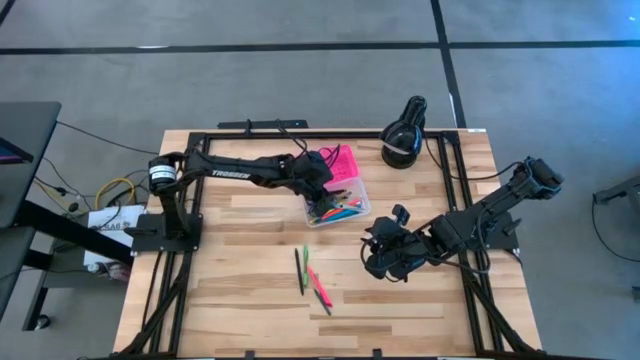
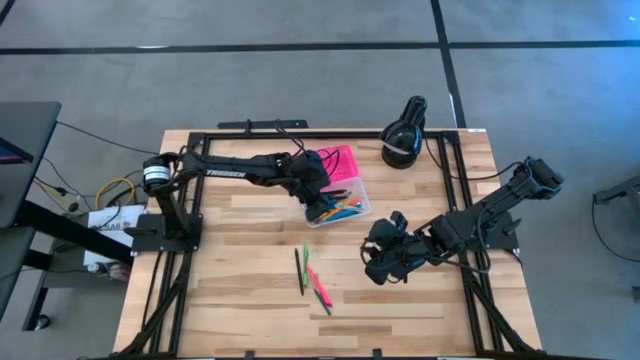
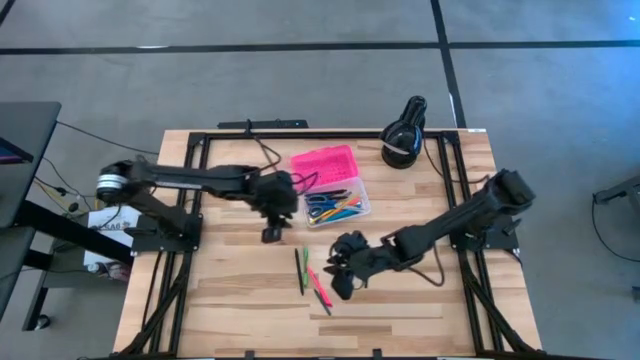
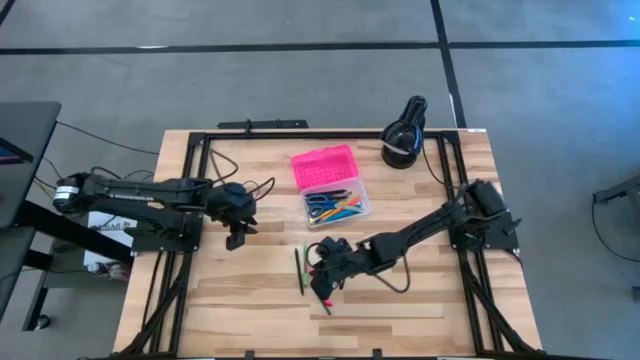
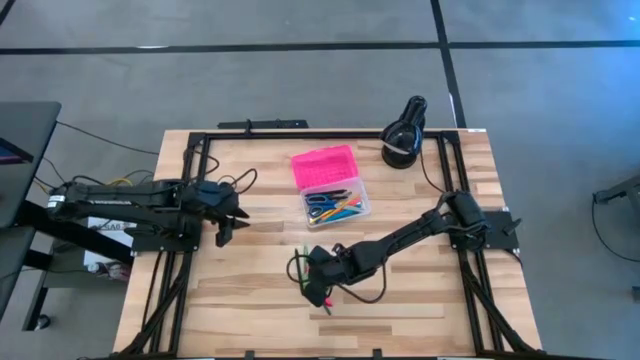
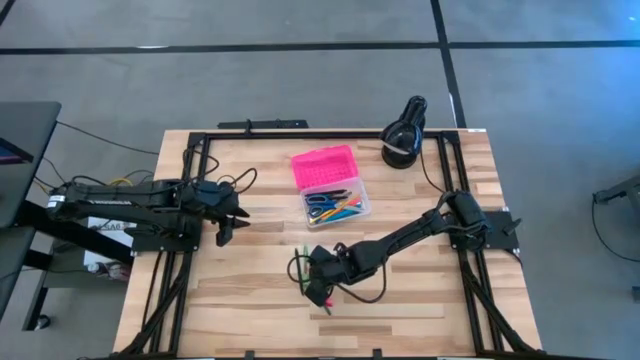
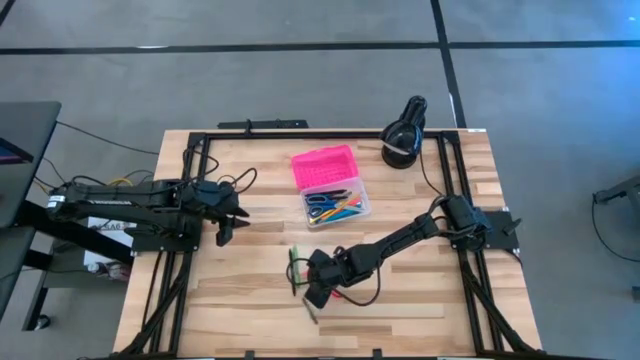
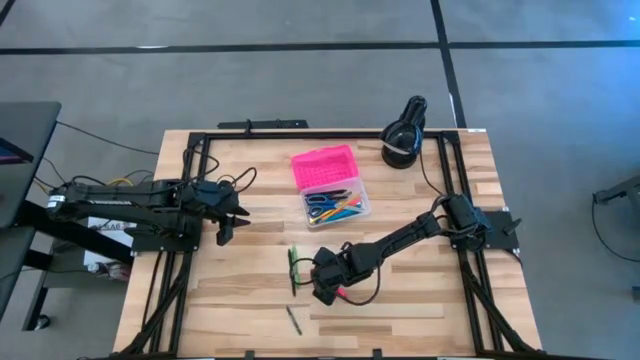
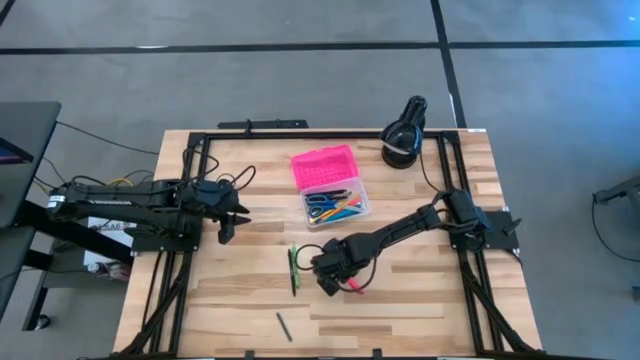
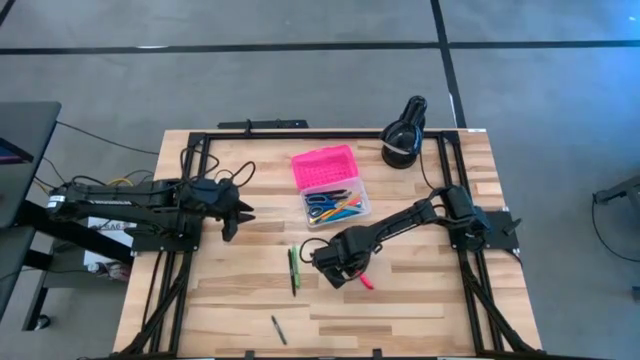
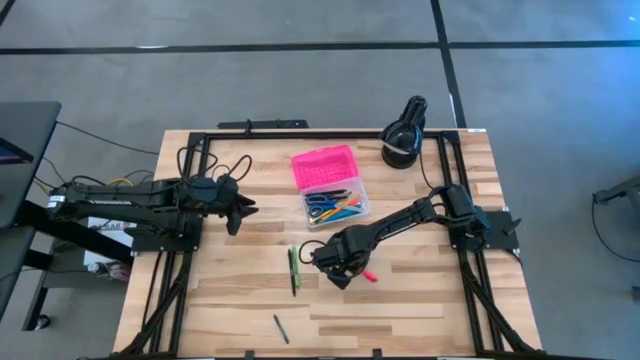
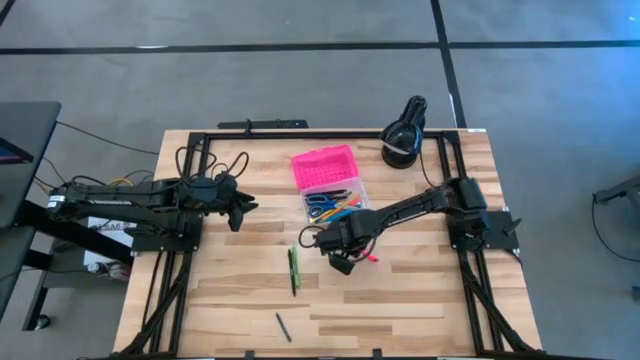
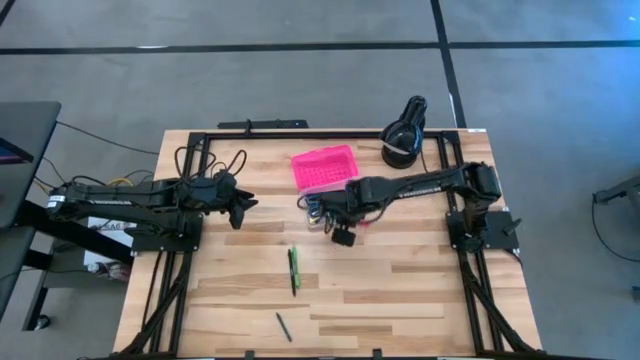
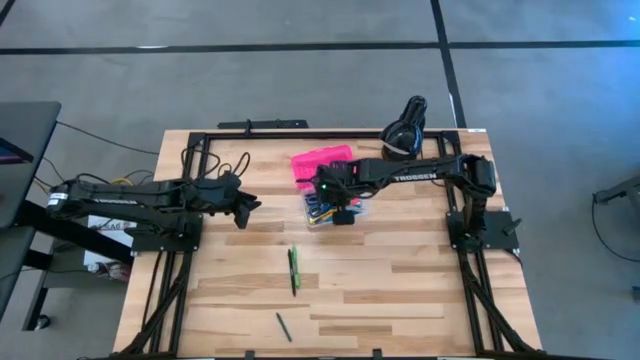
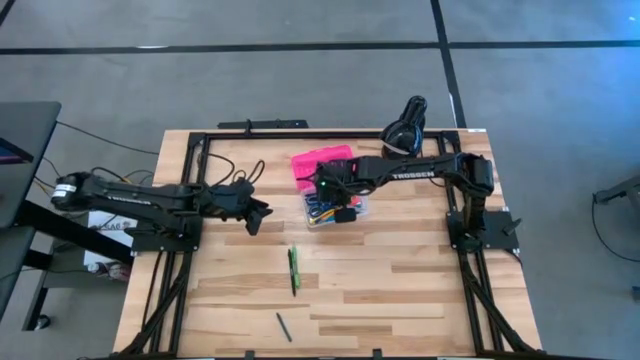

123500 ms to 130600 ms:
Task: Pick & place school supplies into a supply box
Put the pink pen into the pink supply box

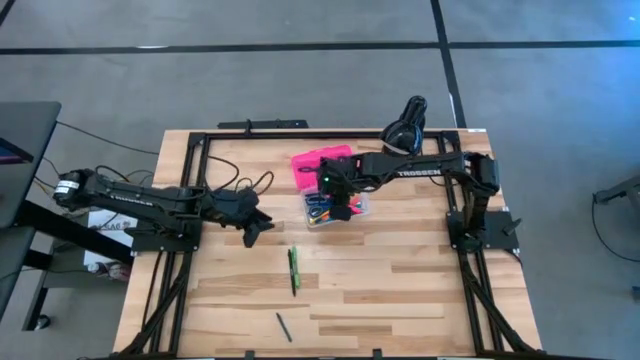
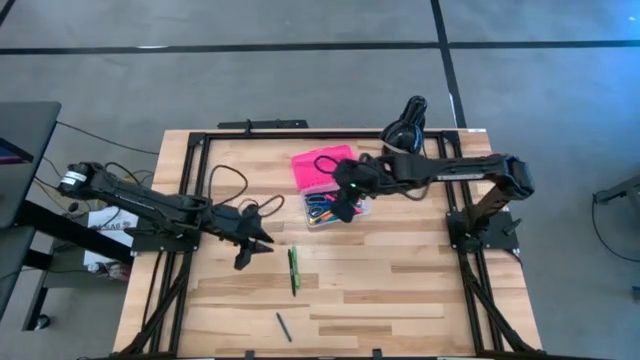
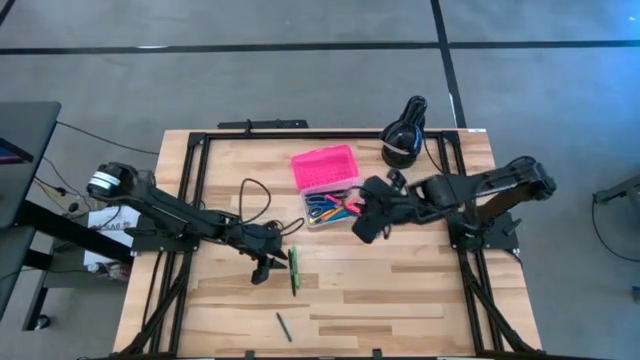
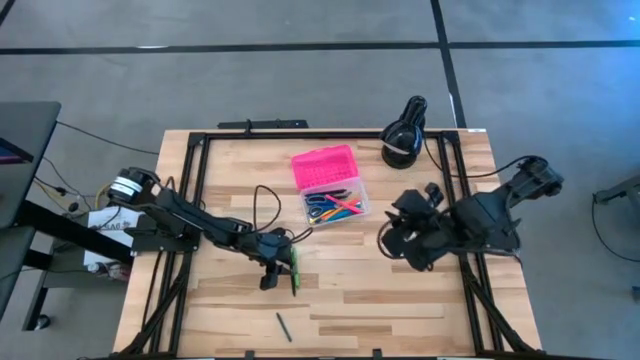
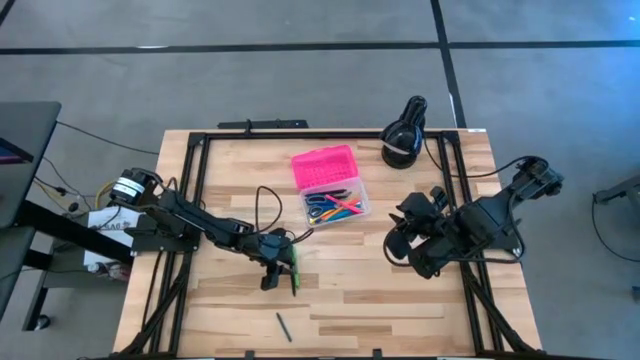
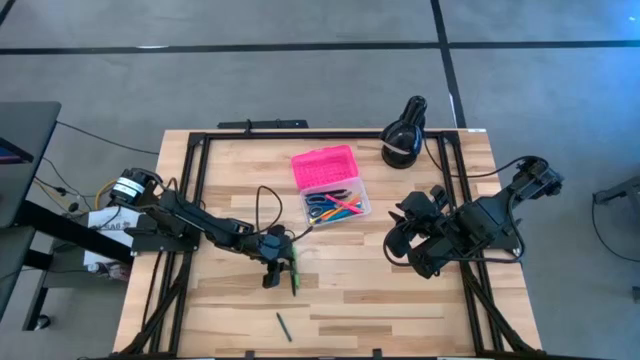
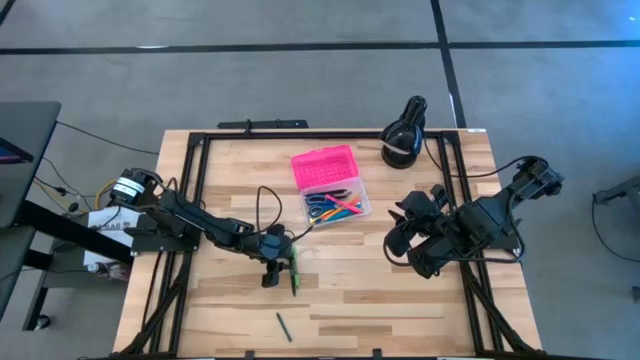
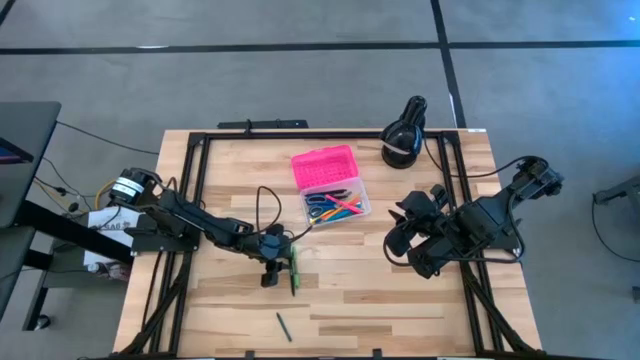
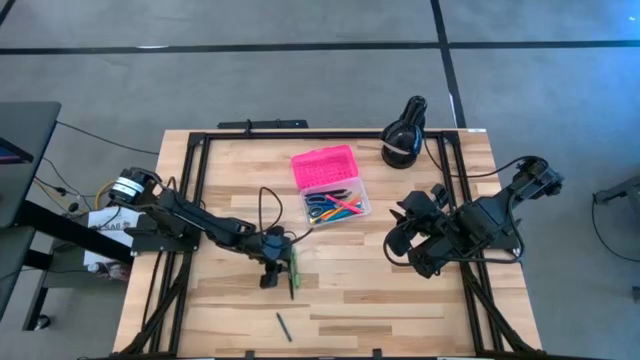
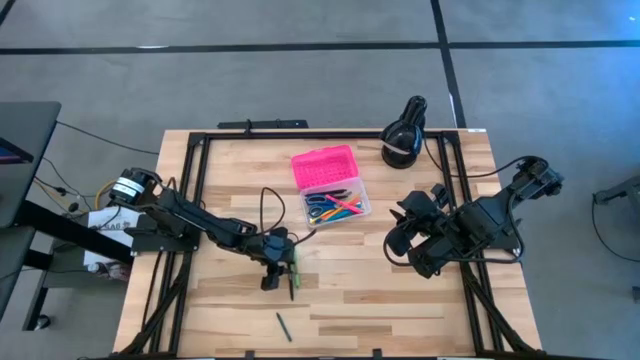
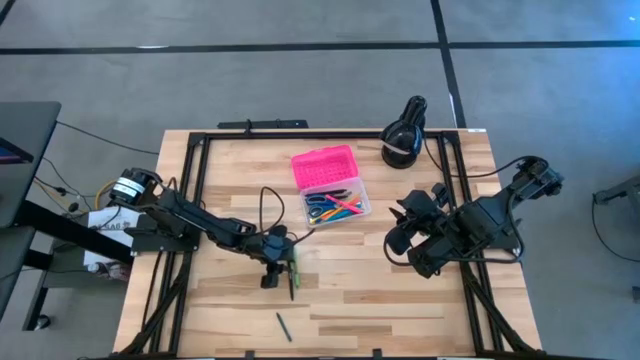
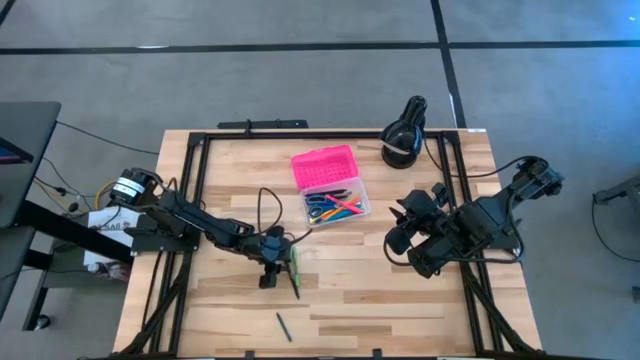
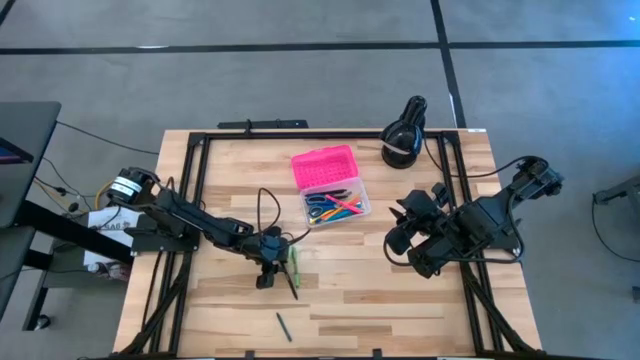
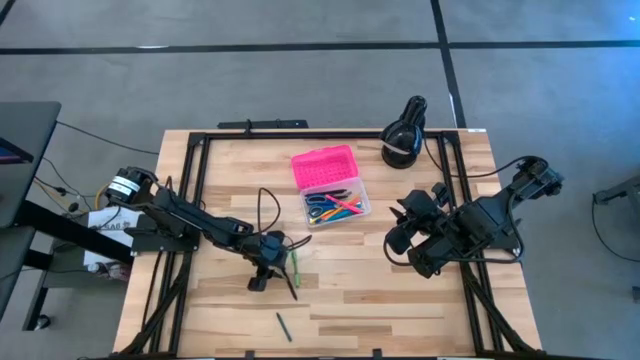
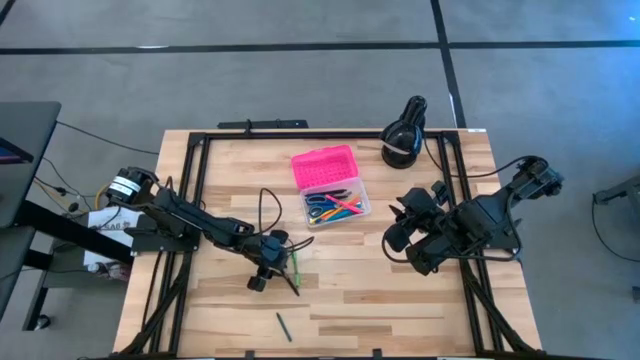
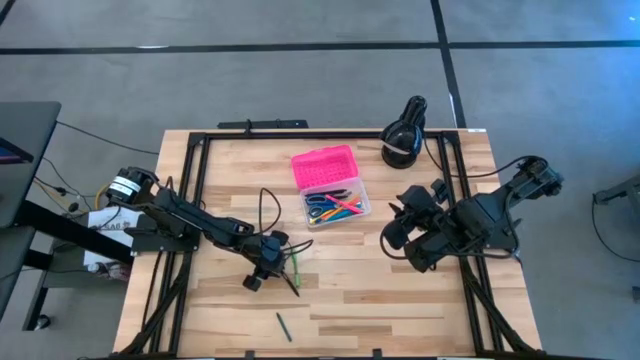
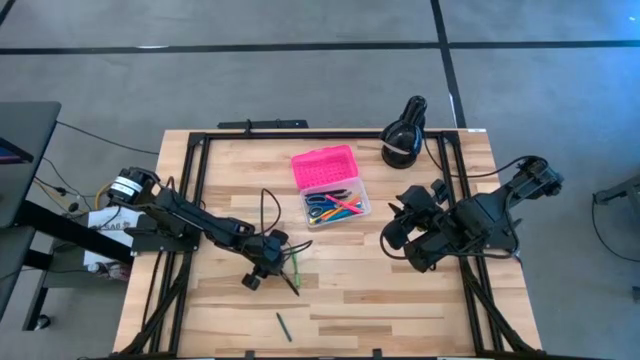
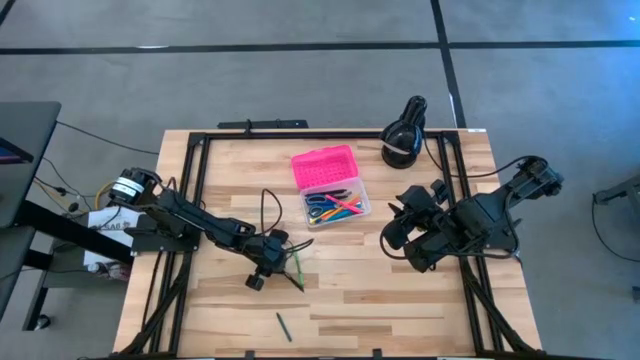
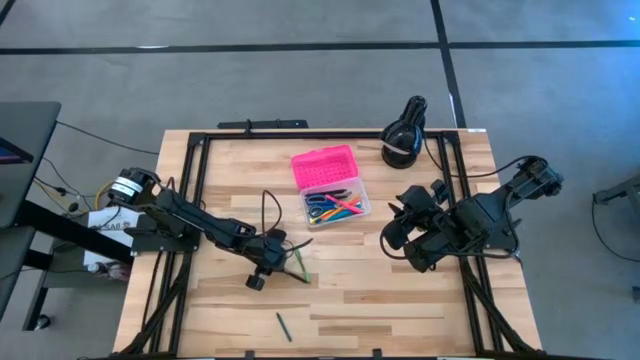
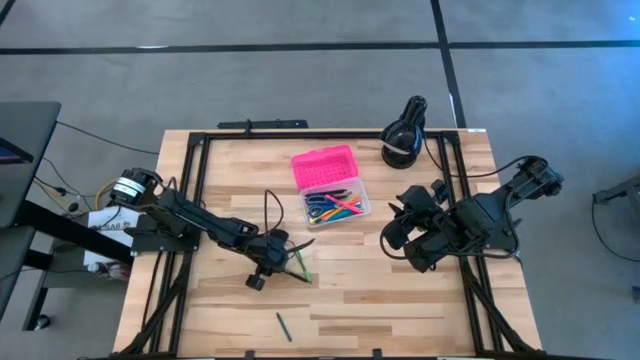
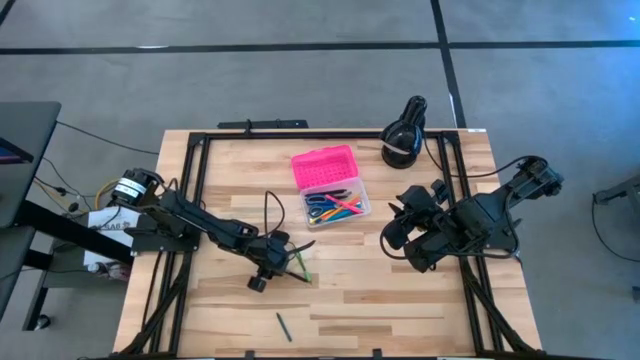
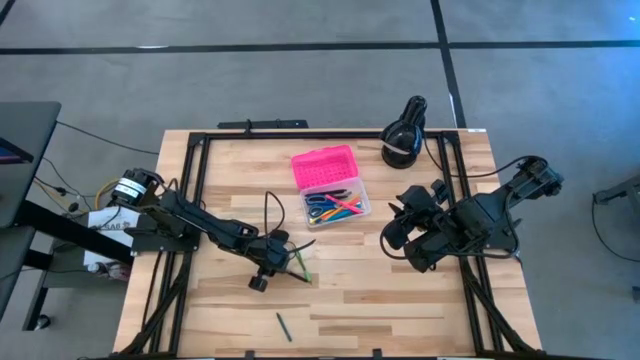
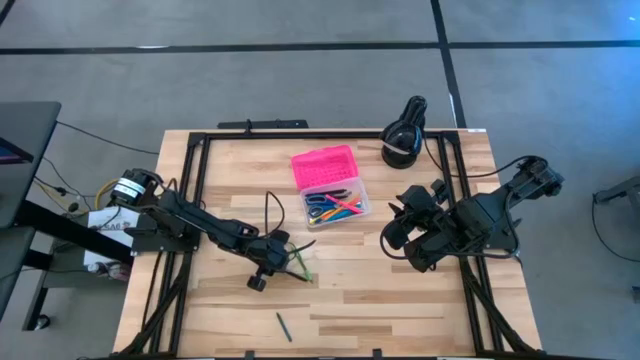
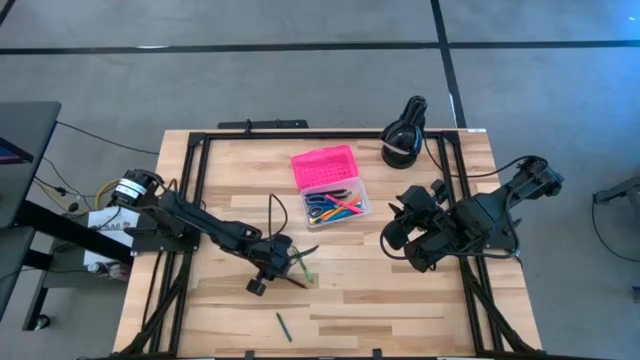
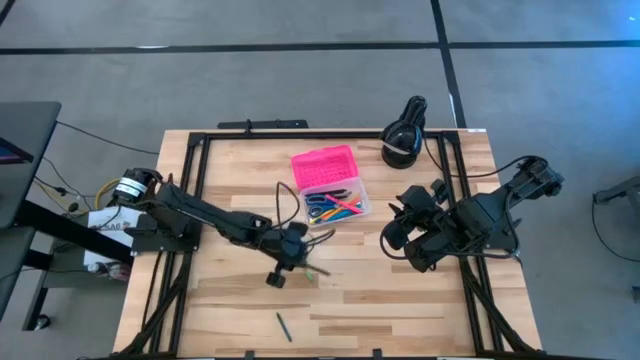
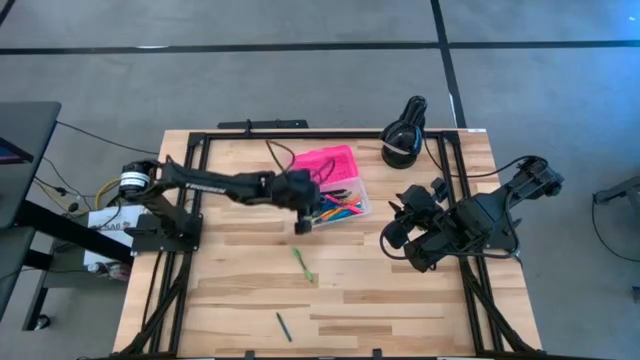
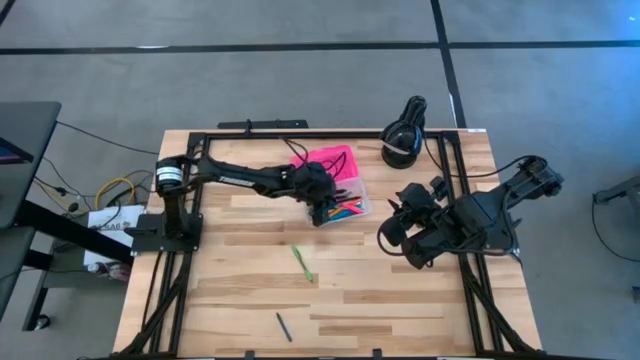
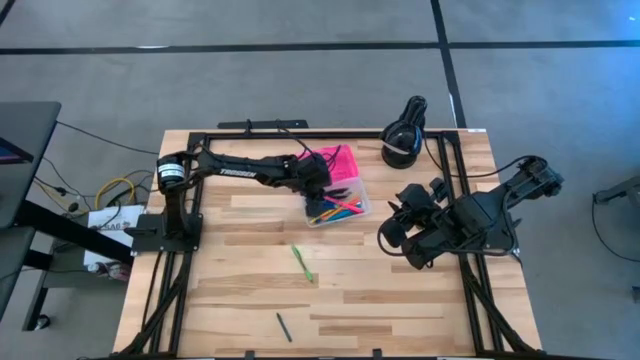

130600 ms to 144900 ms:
Put the black pen into the pink supply box
